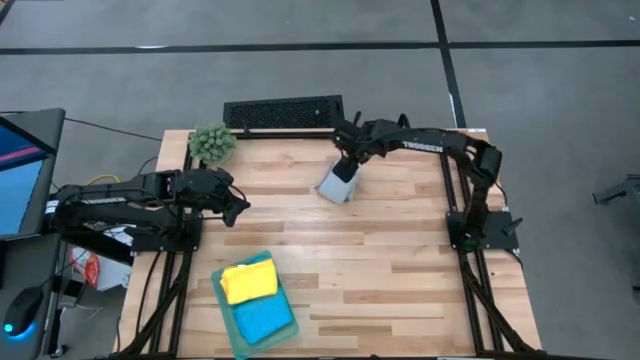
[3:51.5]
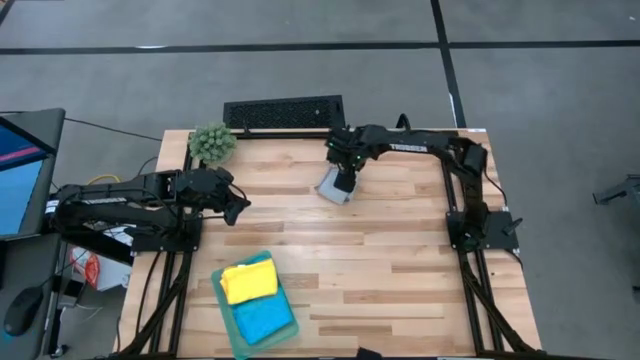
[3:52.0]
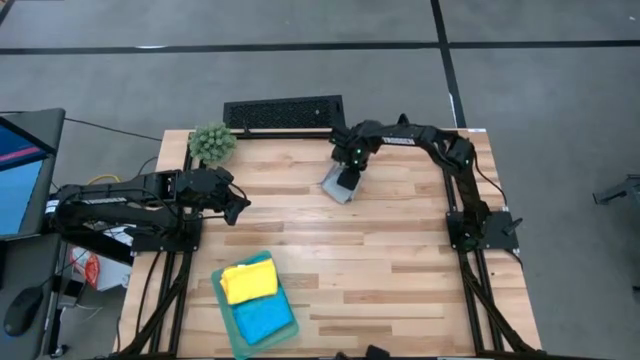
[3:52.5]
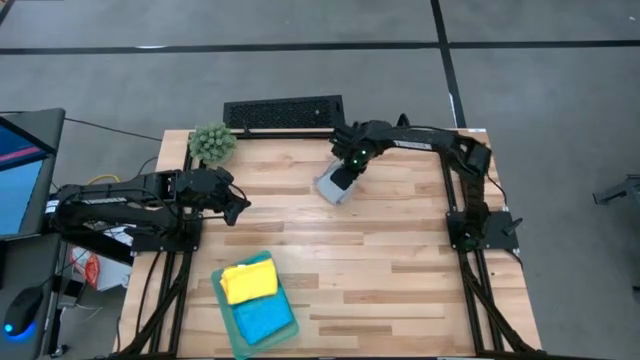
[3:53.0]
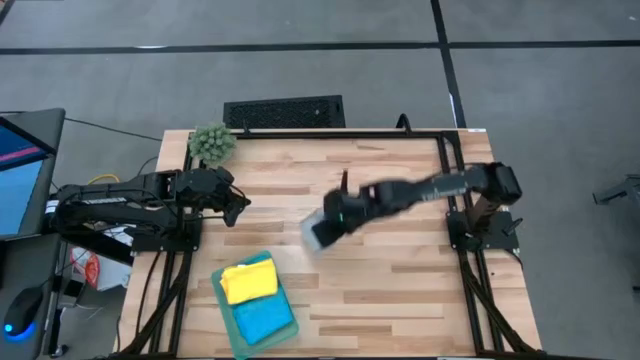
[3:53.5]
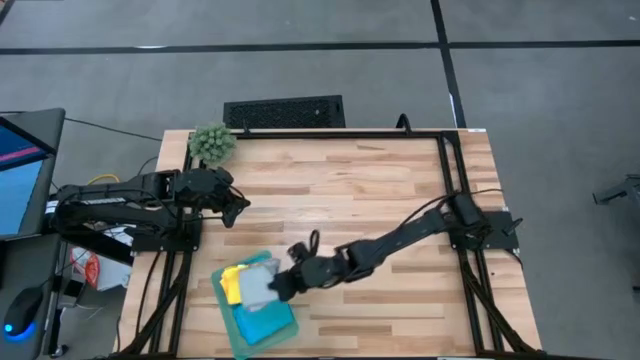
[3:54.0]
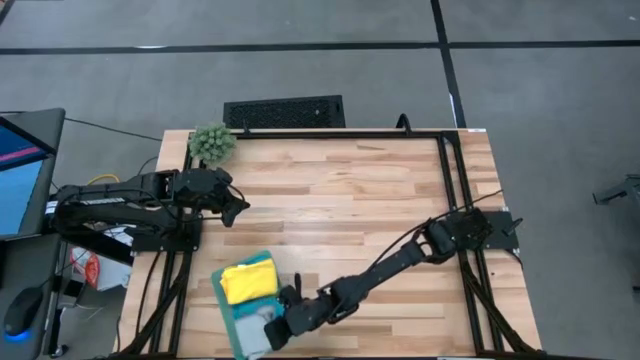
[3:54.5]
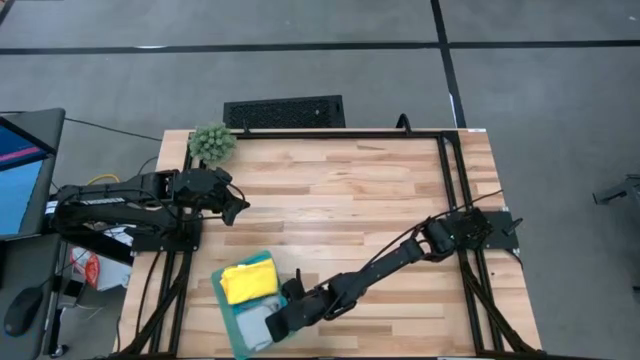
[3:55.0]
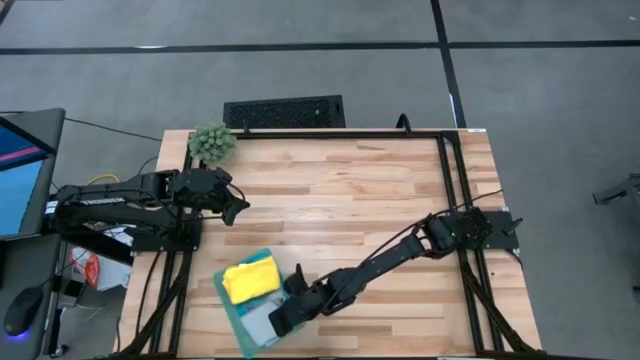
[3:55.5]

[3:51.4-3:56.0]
Task: Fold microfiber towels
Put the folded gray towel into the blue bin

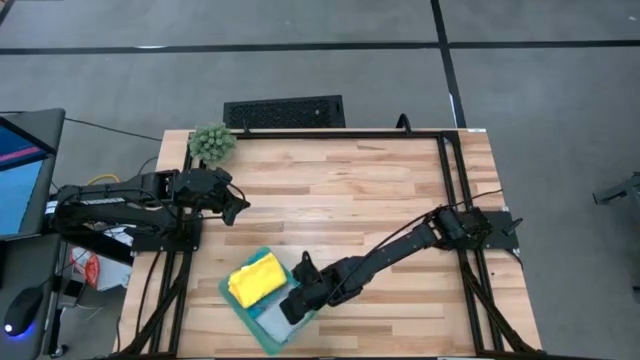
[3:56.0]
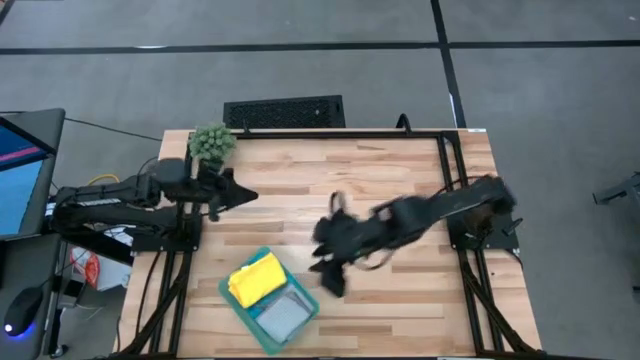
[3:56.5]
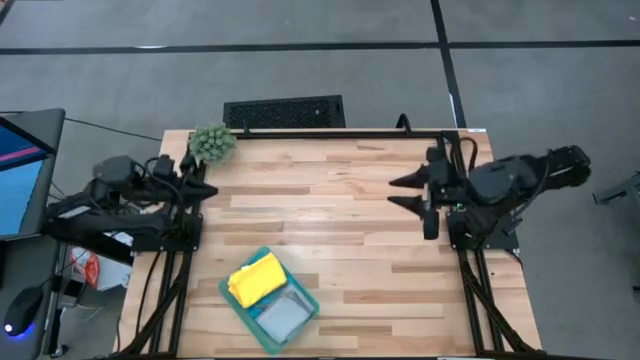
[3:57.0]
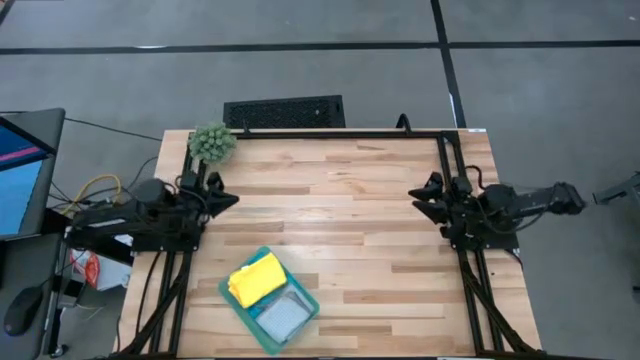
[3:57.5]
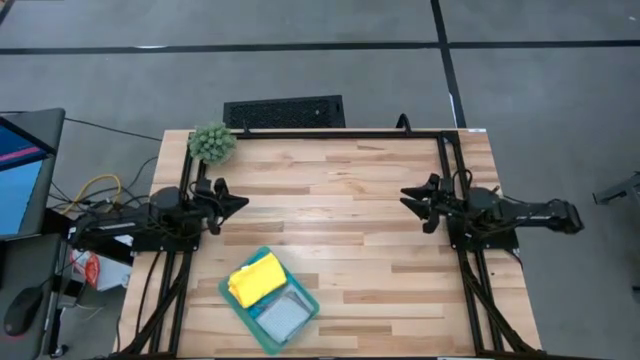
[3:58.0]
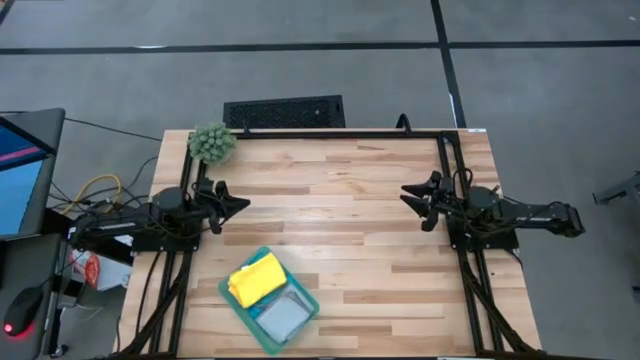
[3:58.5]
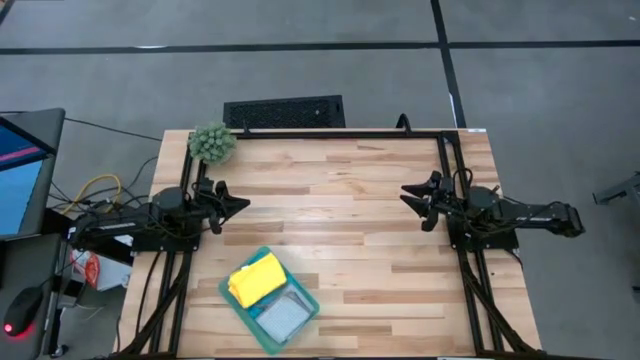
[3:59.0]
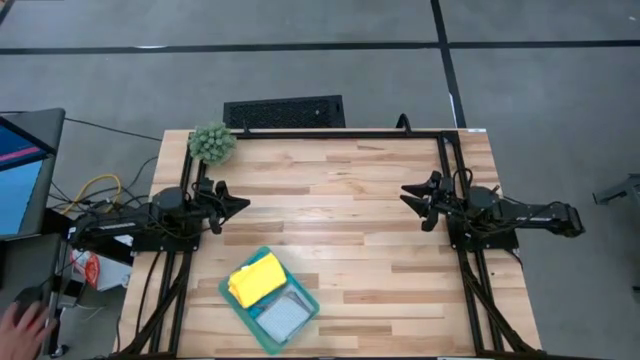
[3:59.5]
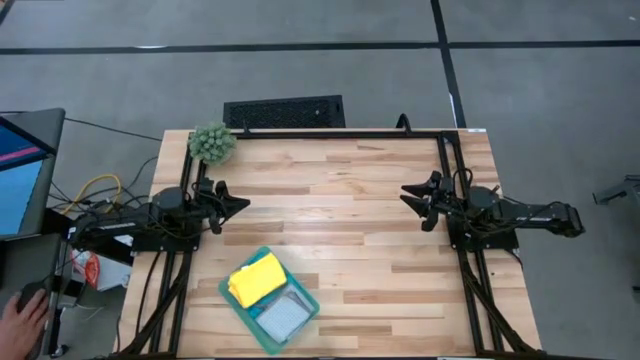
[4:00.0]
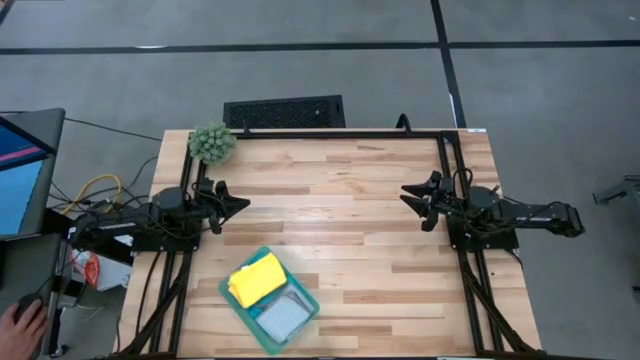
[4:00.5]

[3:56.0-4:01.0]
Return to Home Position

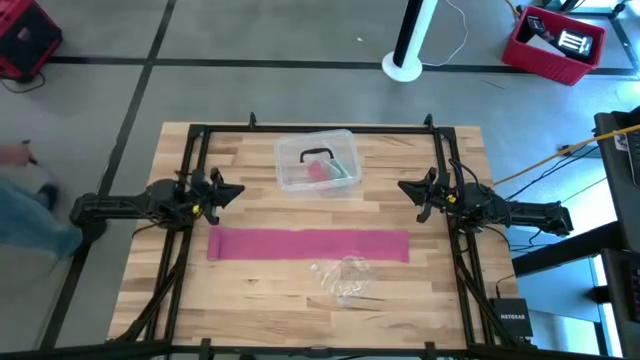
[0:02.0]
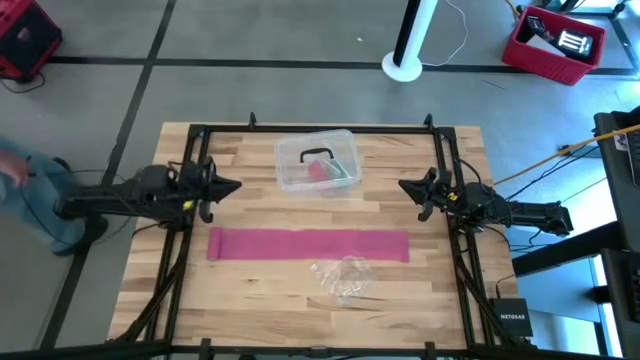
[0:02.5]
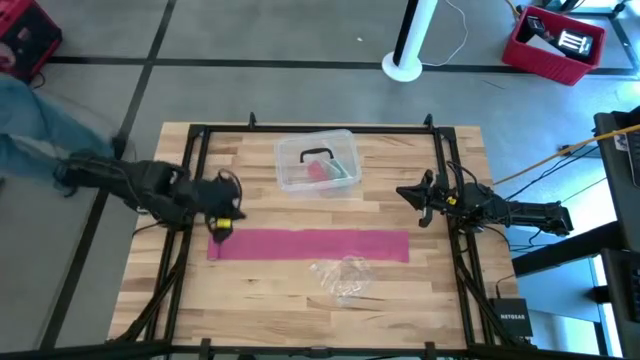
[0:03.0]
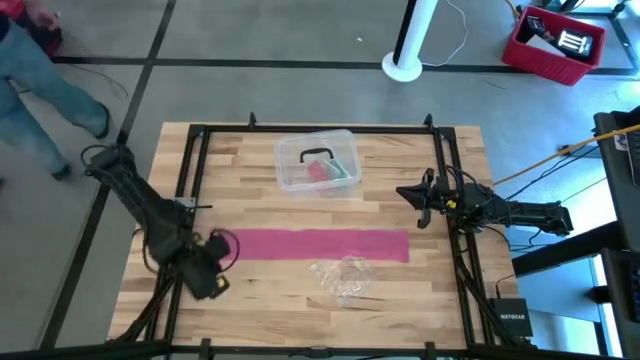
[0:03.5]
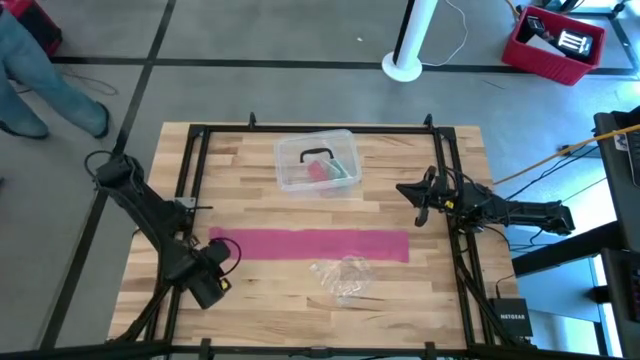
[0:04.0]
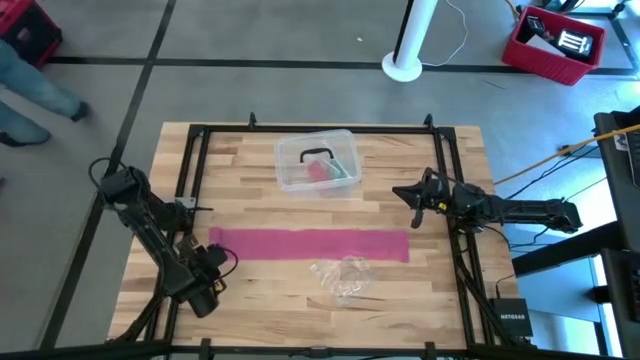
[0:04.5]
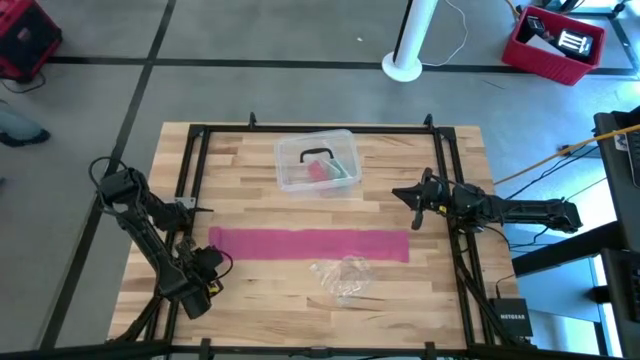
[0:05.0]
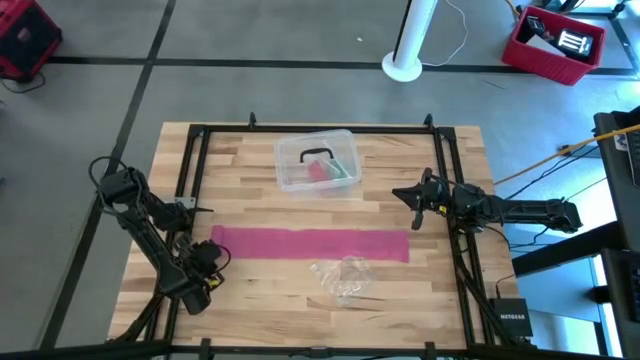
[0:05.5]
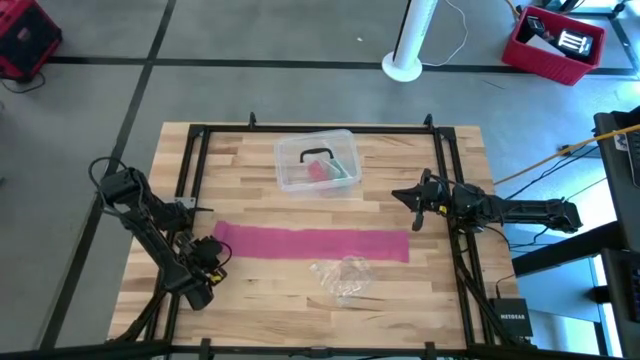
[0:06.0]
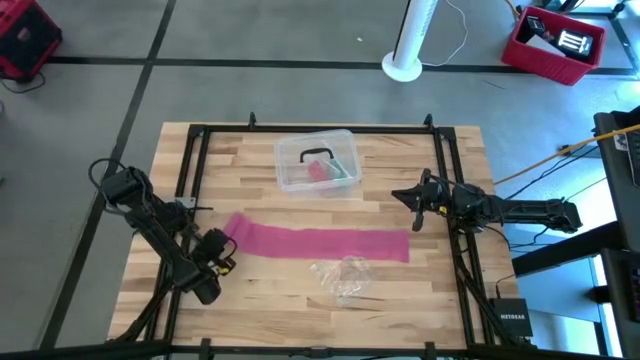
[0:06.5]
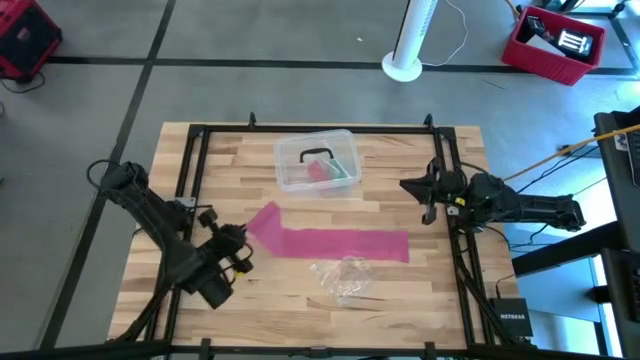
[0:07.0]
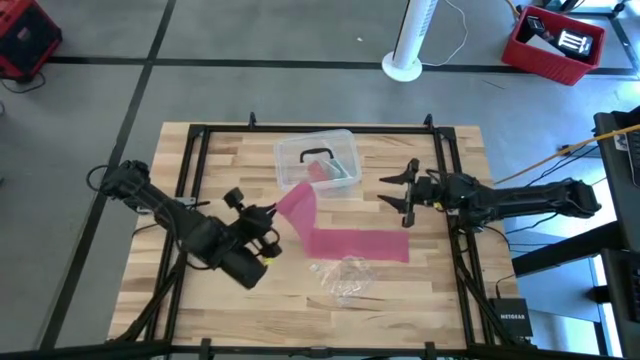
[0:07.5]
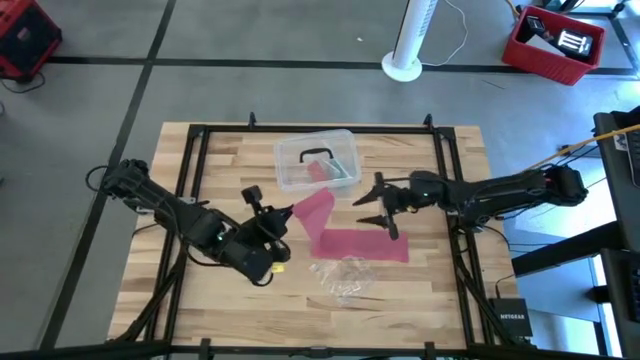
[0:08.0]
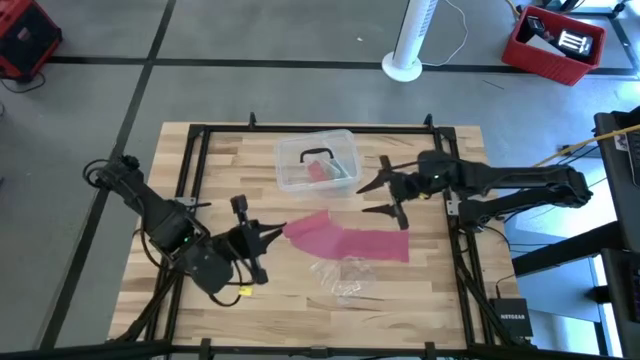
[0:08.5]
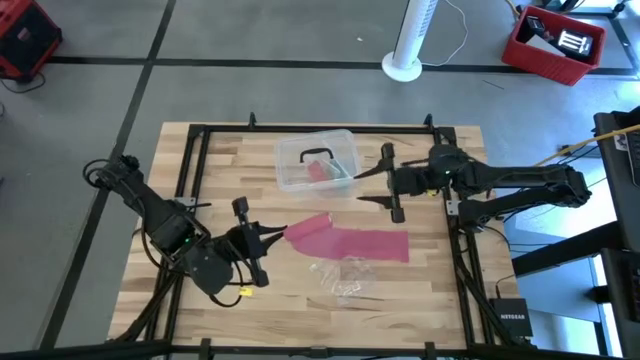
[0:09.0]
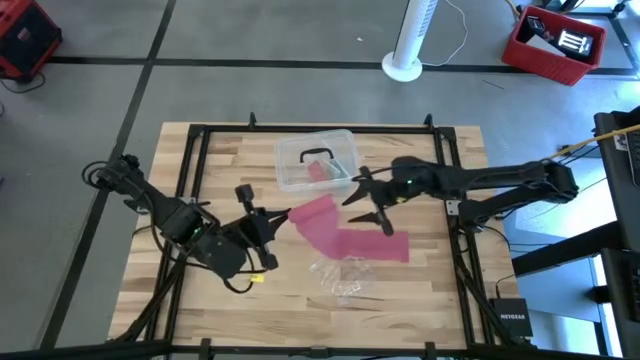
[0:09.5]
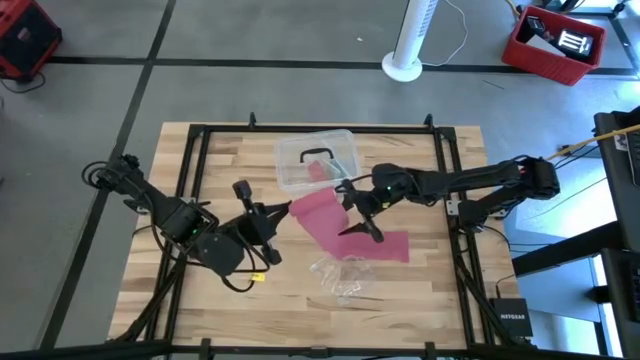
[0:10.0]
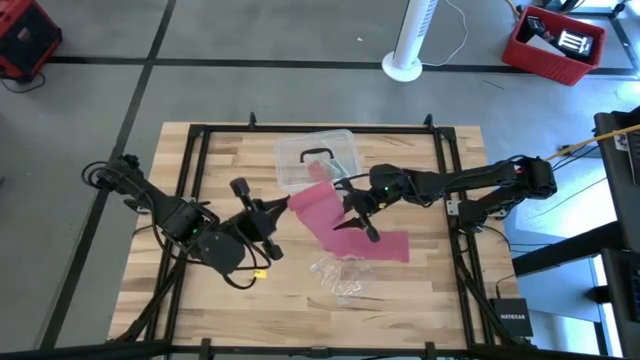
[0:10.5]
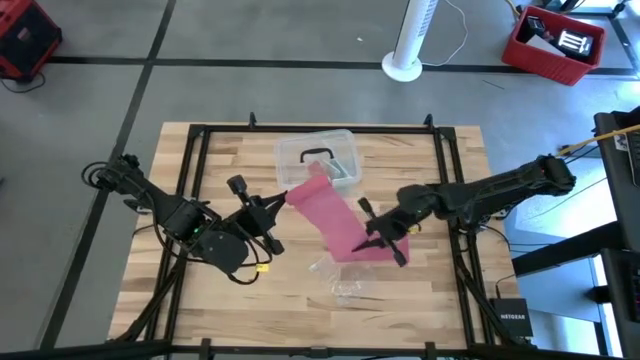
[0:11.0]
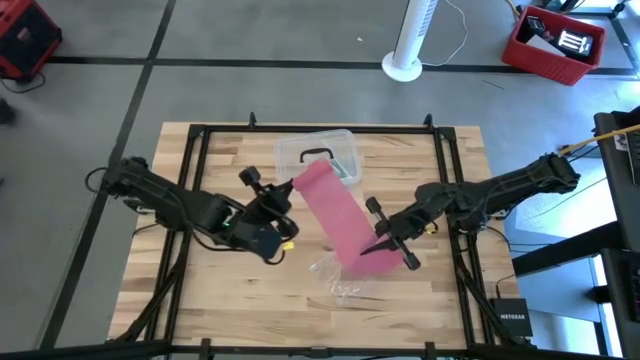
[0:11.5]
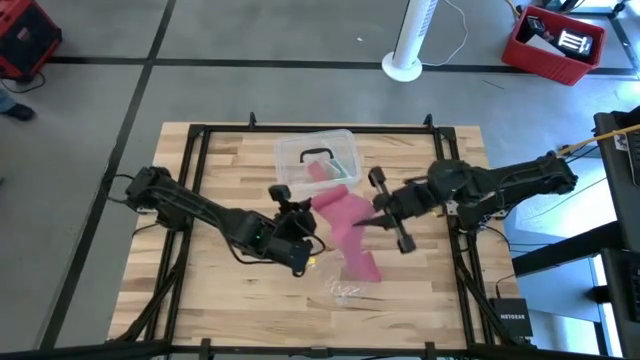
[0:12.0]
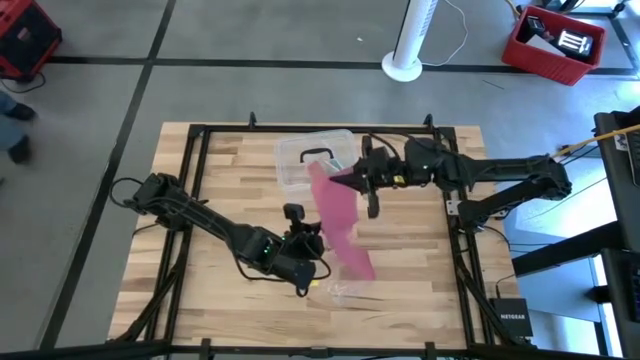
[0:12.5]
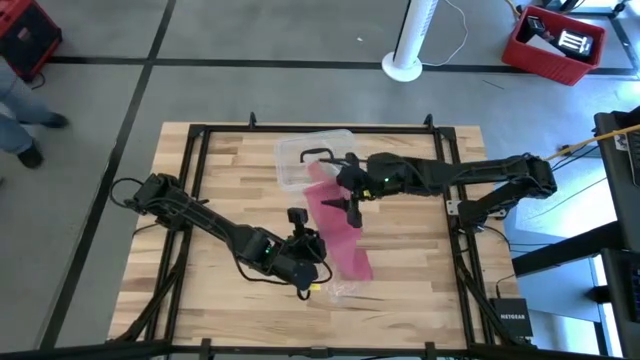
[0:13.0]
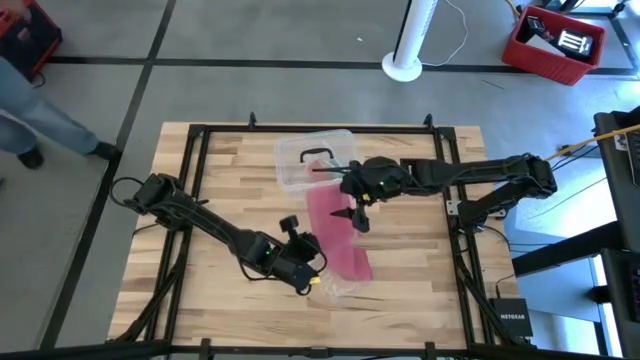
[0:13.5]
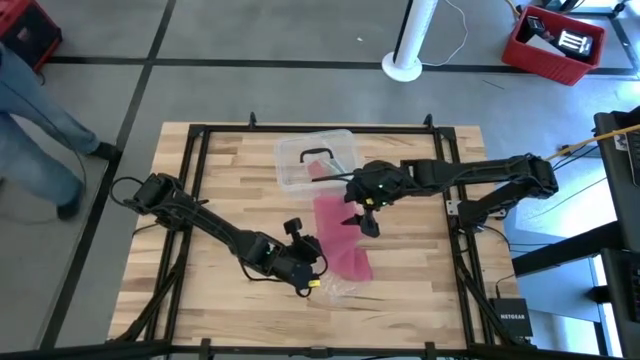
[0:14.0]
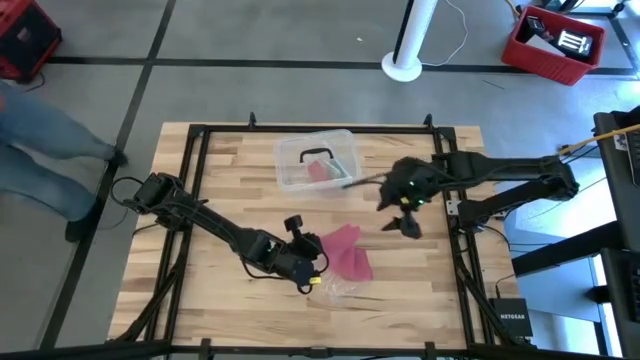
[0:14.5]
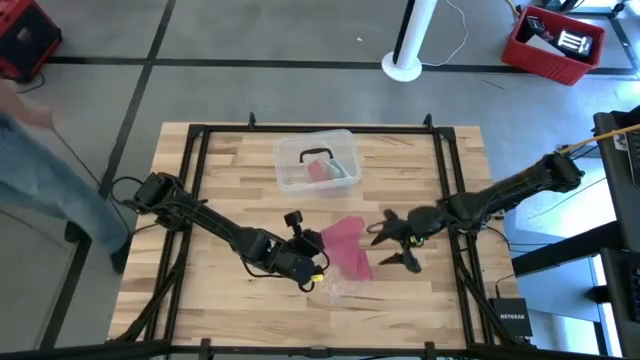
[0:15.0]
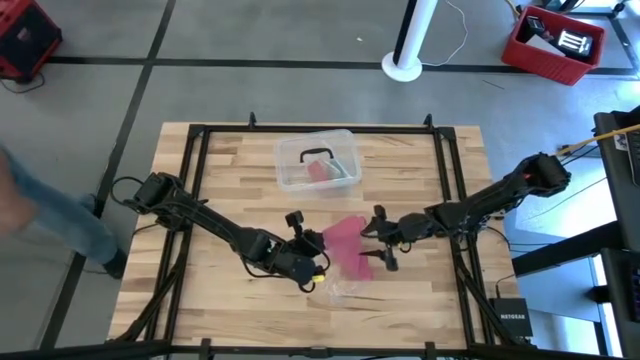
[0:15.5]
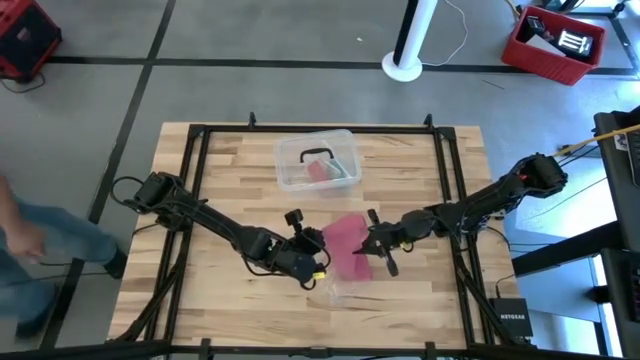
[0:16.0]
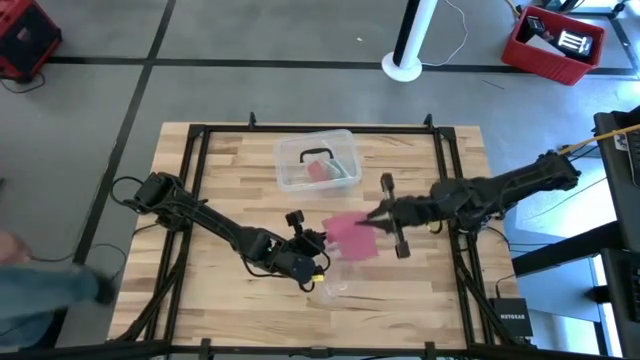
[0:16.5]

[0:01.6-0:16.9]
Task: Roll bandage
Roll the pink bandage
